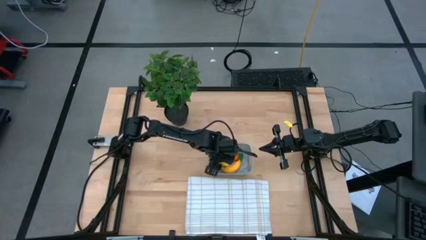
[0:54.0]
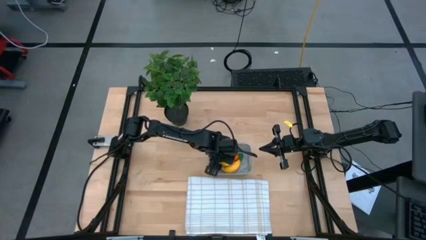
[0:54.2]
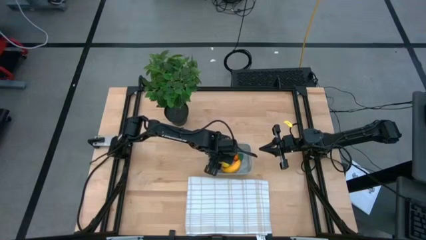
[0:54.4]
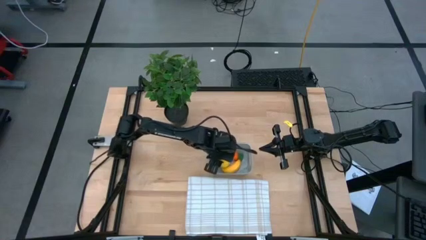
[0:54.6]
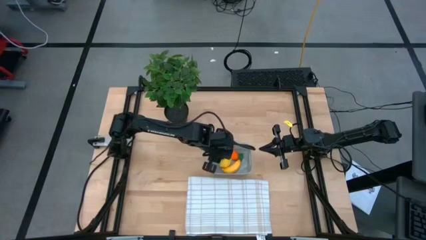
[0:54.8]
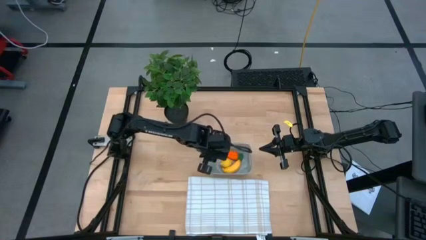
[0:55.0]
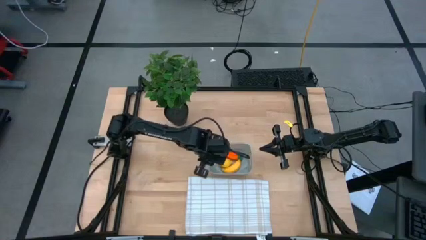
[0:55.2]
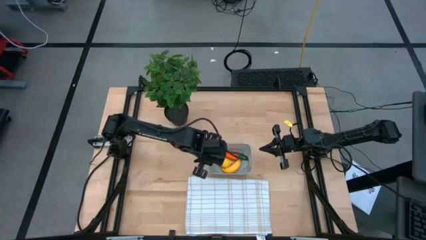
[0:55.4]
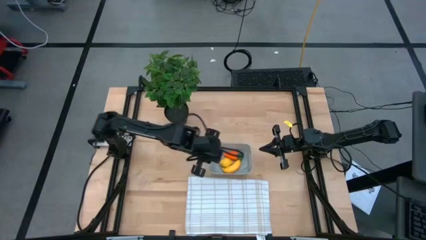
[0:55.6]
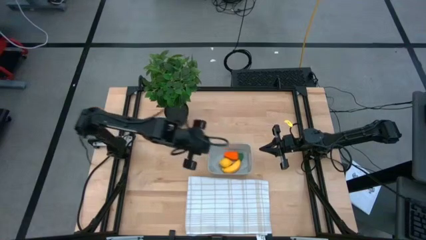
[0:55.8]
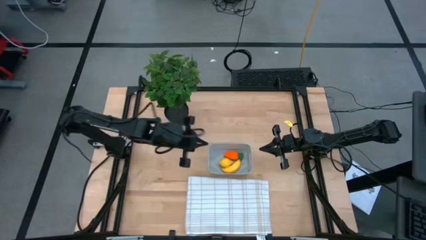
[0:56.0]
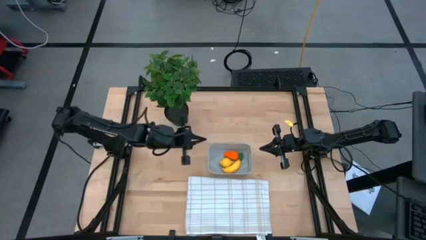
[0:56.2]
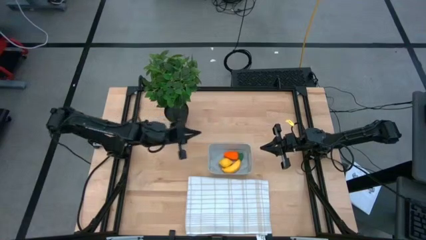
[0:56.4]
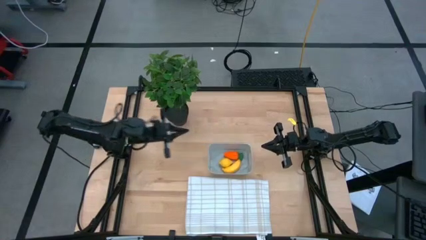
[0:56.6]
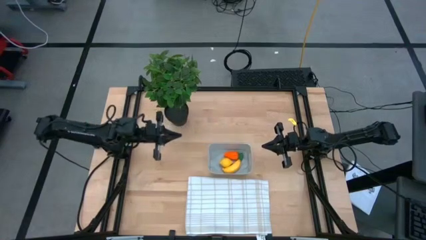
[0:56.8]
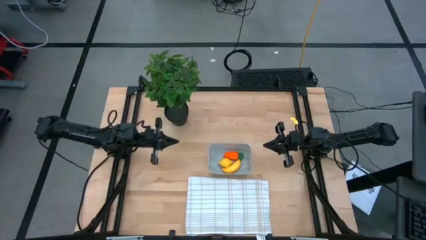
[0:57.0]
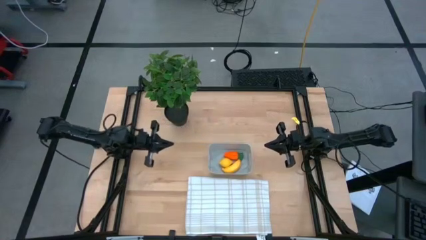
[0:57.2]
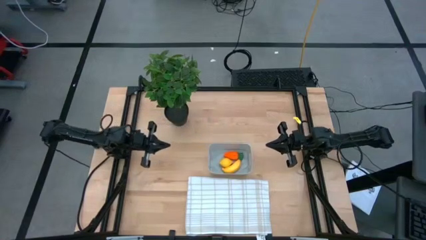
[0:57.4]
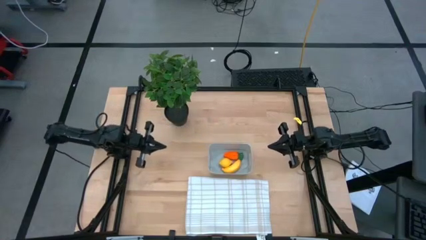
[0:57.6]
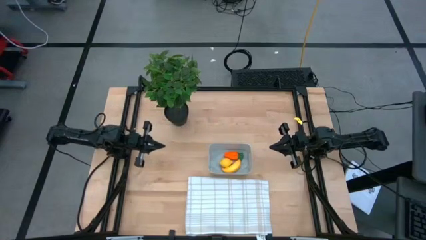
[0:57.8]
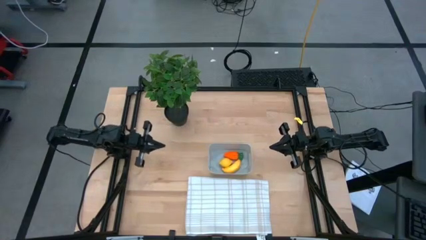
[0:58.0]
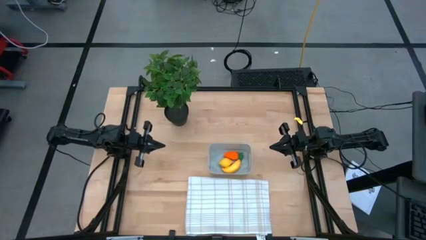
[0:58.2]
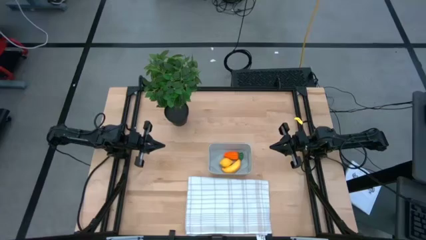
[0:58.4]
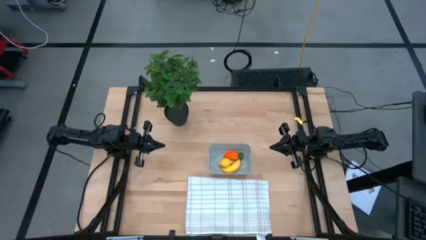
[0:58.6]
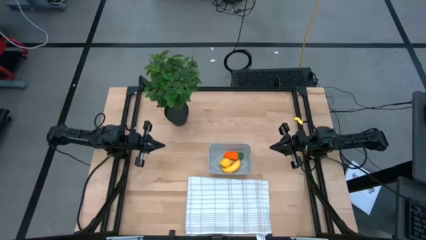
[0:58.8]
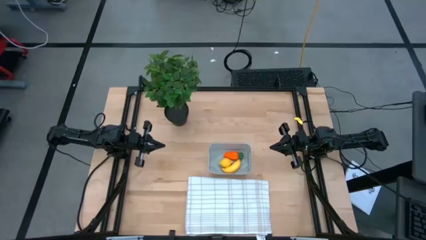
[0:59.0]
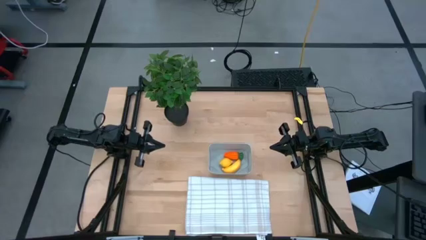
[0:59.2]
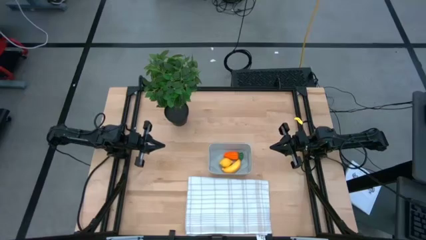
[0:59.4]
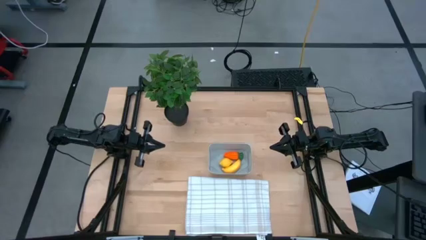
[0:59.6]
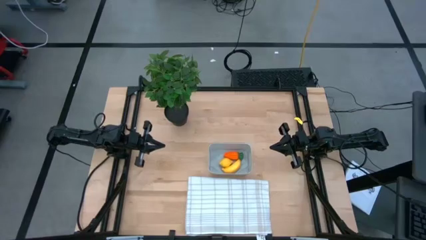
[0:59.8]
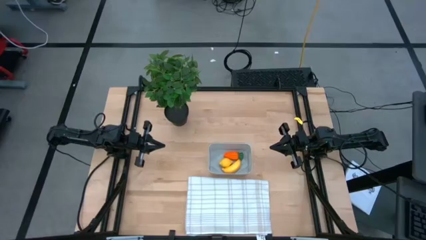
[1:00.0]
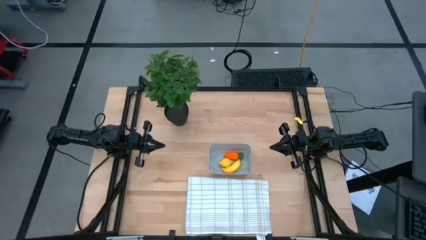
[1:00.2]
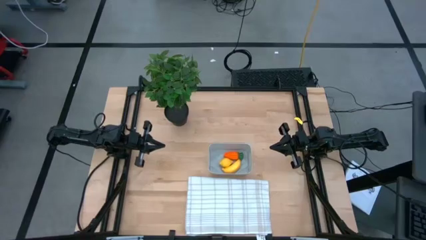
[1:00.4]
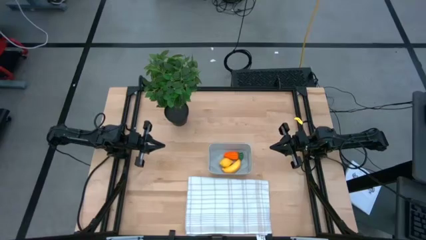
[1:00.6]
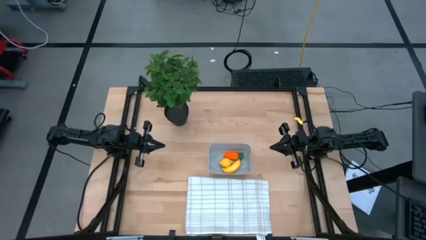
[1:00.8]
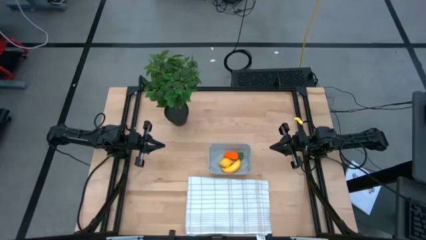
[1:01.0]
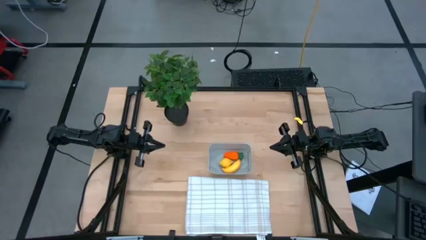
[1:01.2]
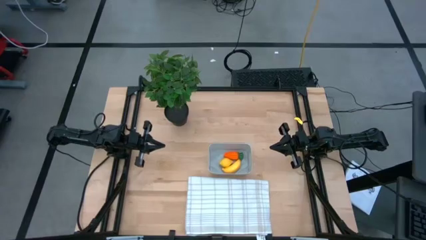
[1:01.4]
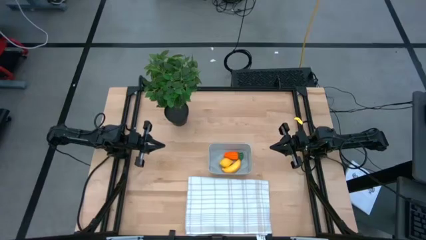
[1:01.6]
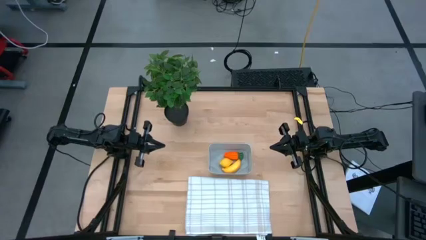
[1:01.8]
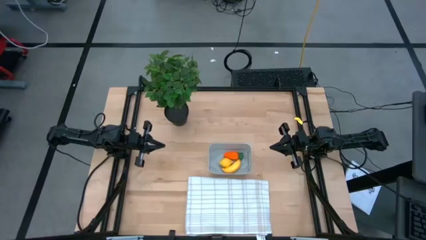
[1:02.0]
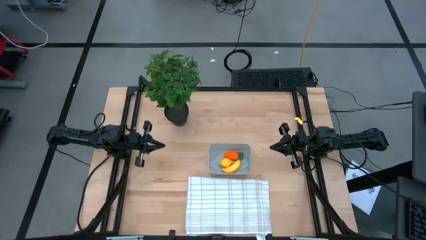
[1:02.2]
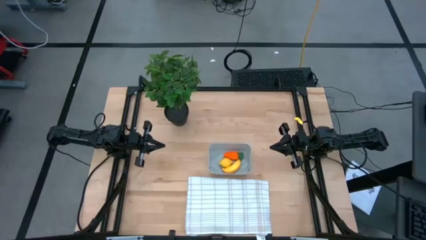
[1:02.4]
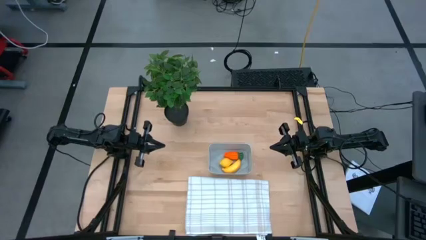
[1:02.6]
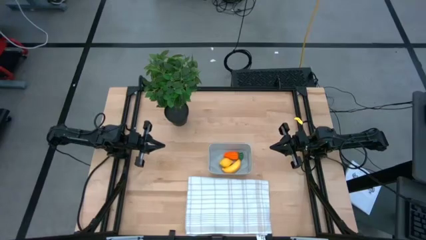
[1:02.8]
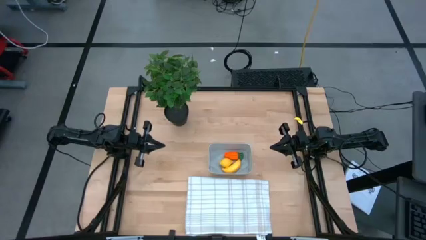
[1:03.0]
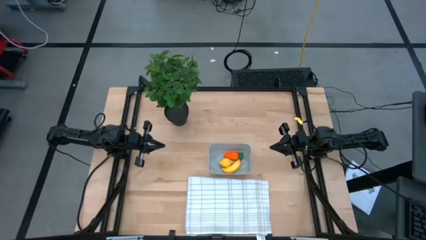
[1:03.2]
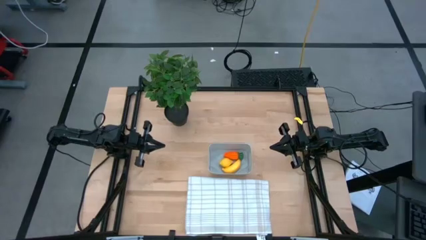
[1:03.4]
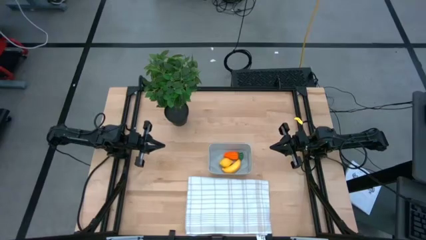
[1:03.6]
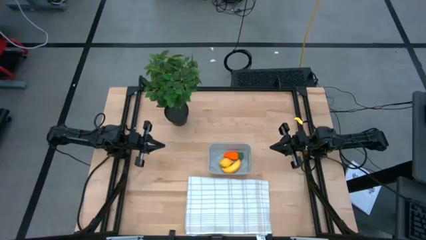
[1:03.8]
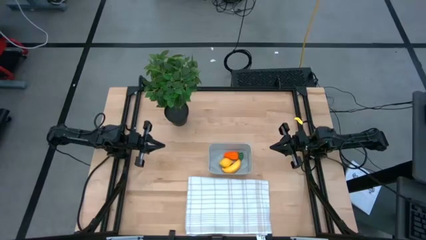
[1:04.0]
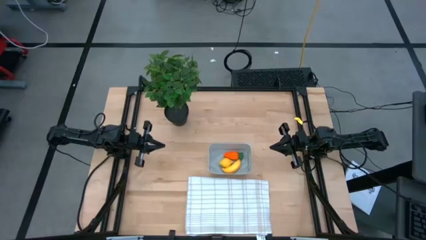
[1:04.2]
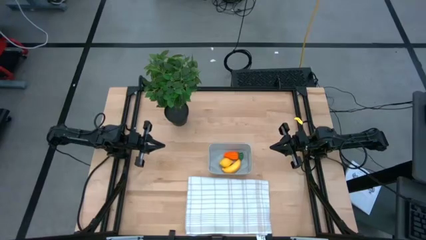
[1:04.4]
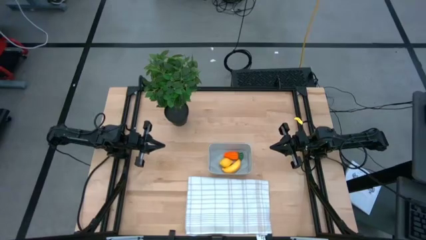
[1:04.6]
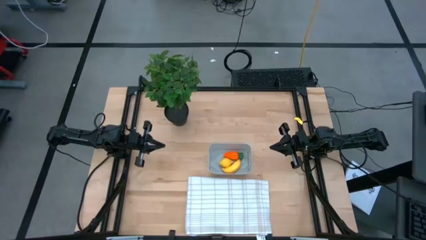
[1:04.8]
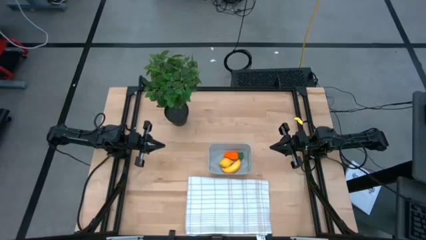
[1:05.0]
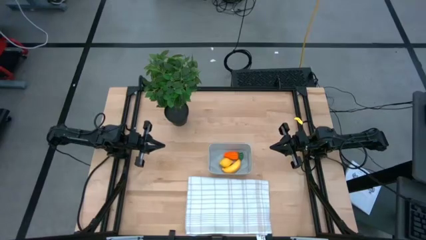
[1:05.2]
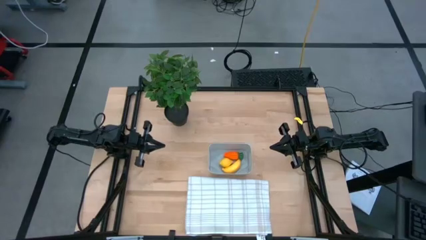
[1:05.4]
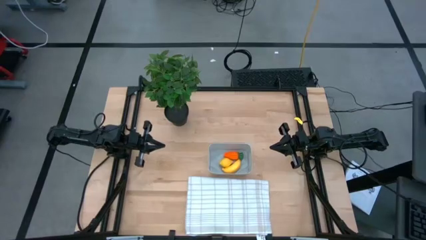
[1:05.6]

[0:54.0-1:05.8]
Task: Pick and placing Produce into tupperware
Return to Home Position
